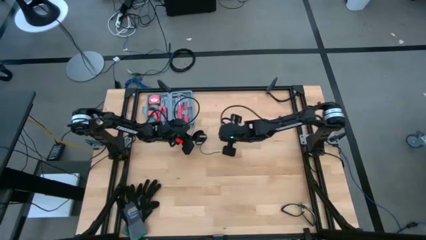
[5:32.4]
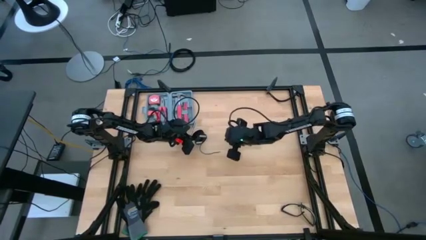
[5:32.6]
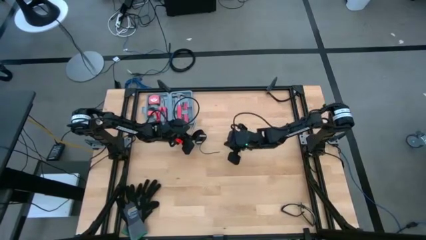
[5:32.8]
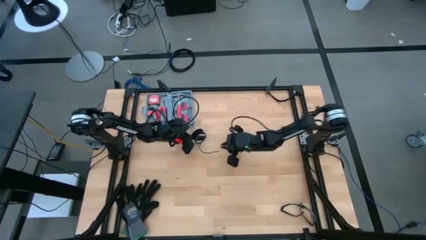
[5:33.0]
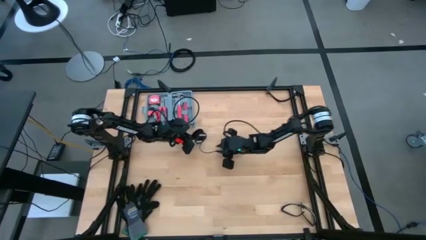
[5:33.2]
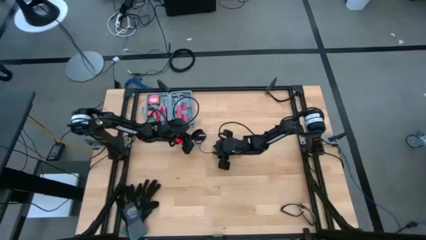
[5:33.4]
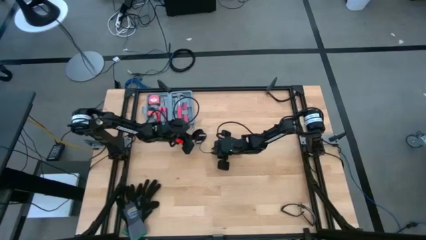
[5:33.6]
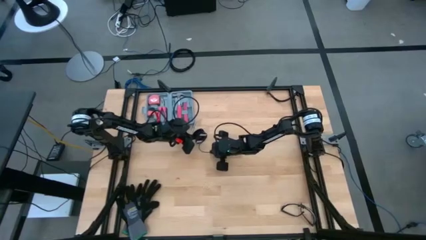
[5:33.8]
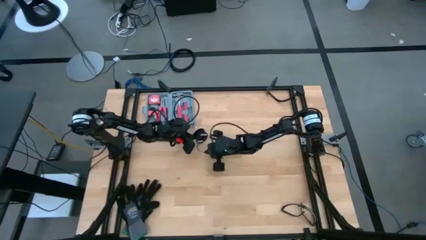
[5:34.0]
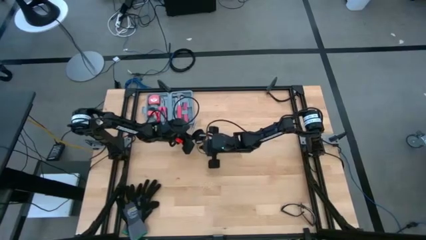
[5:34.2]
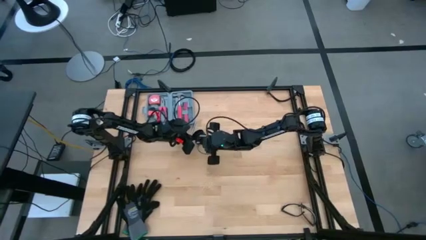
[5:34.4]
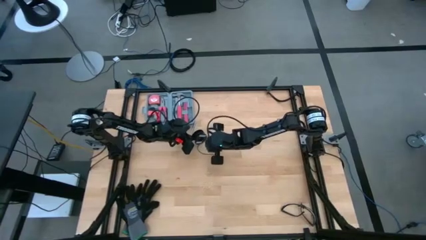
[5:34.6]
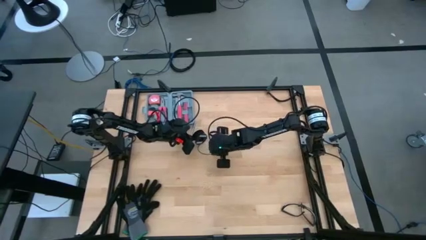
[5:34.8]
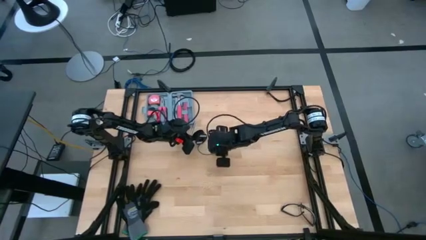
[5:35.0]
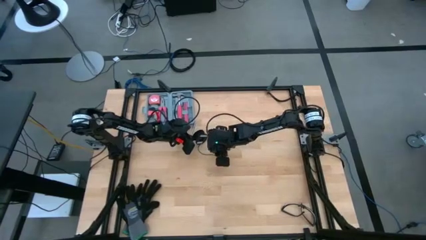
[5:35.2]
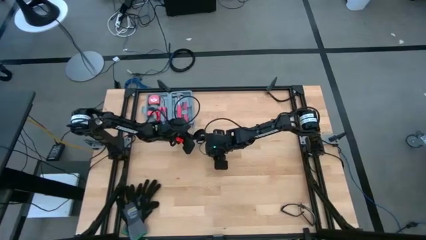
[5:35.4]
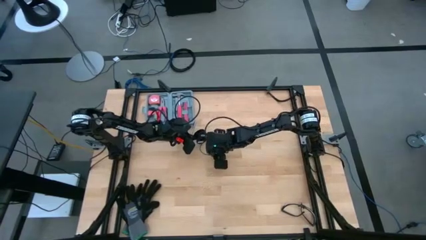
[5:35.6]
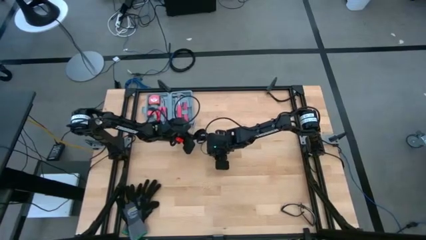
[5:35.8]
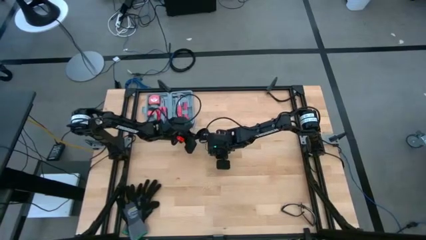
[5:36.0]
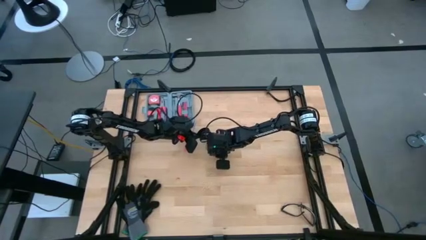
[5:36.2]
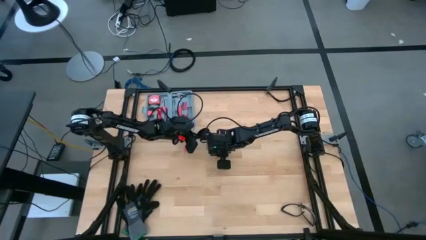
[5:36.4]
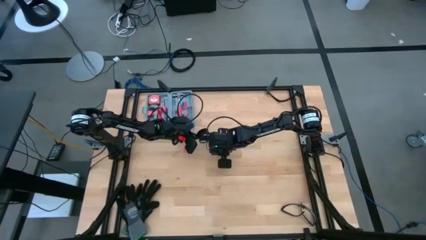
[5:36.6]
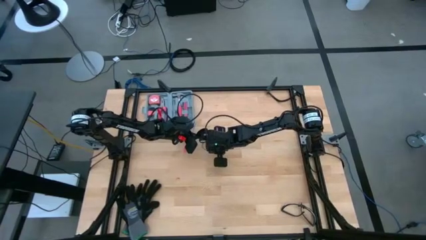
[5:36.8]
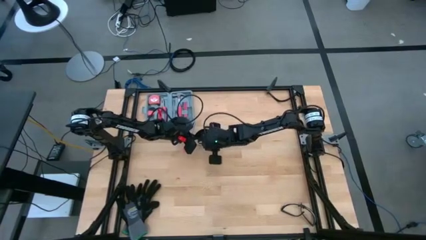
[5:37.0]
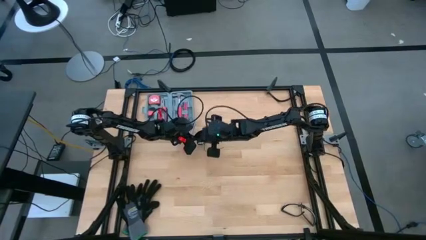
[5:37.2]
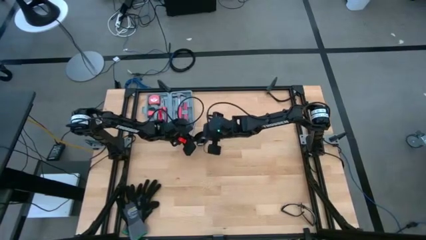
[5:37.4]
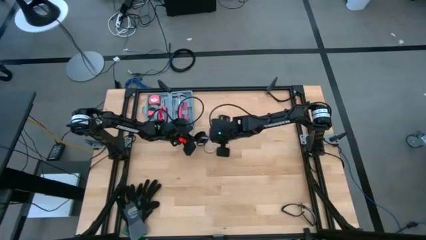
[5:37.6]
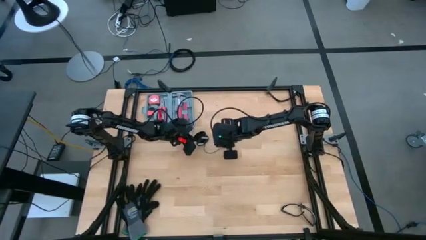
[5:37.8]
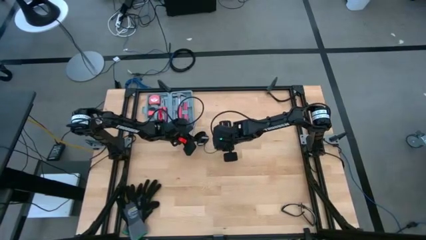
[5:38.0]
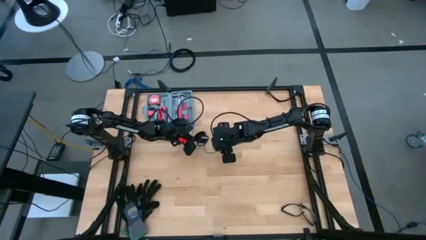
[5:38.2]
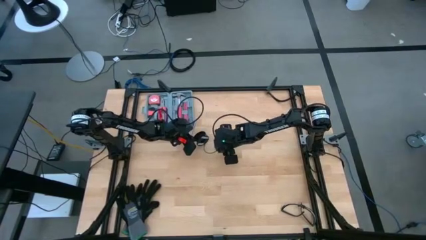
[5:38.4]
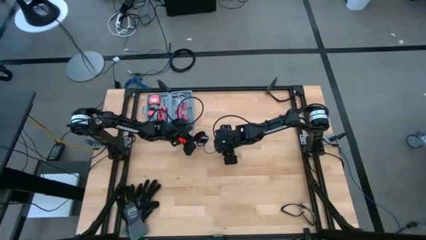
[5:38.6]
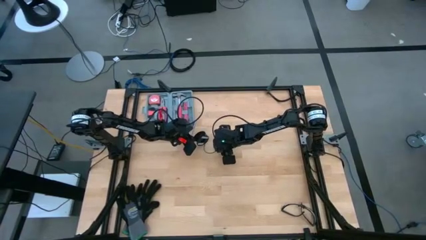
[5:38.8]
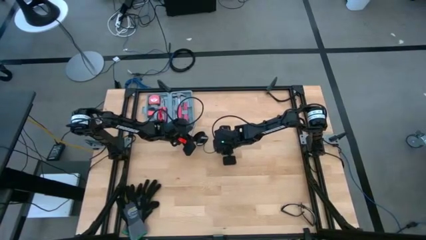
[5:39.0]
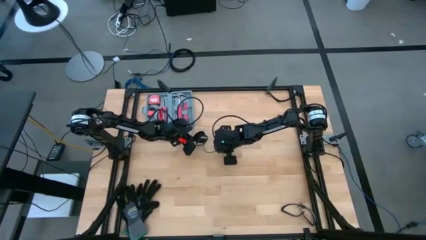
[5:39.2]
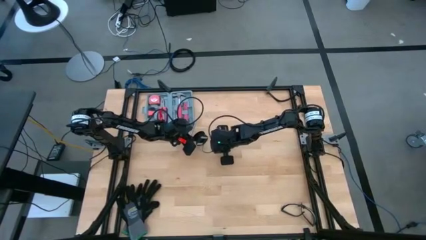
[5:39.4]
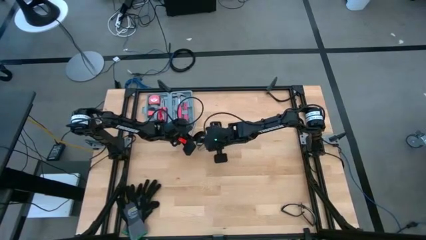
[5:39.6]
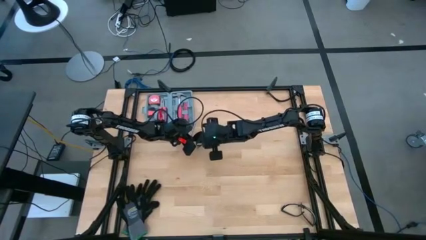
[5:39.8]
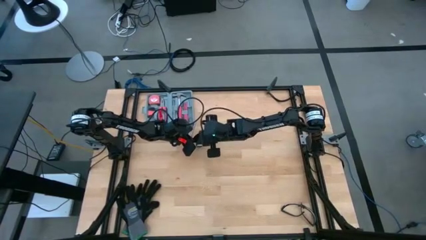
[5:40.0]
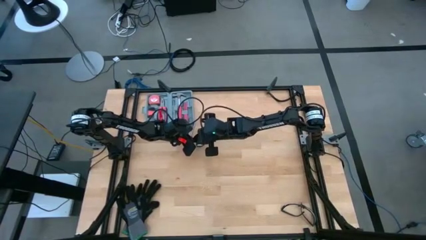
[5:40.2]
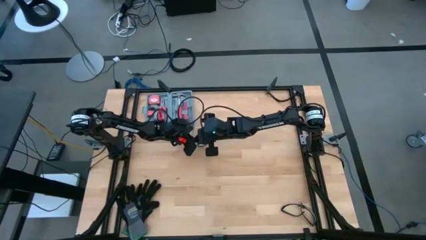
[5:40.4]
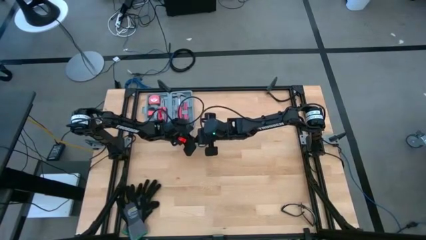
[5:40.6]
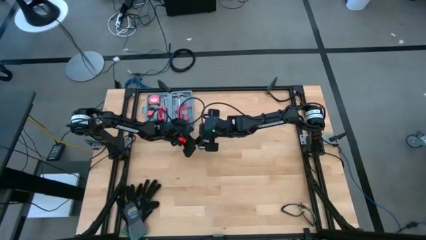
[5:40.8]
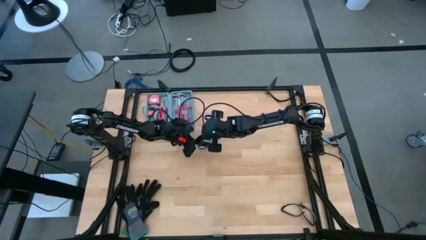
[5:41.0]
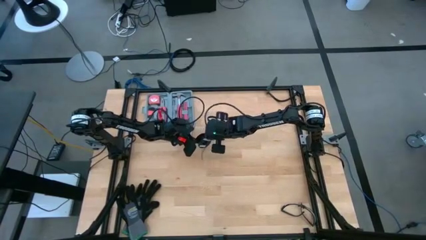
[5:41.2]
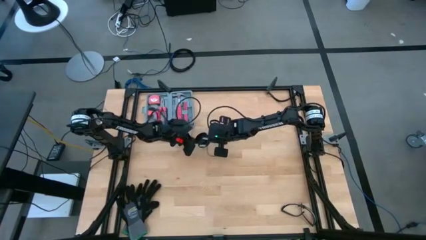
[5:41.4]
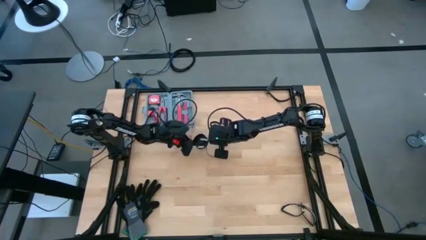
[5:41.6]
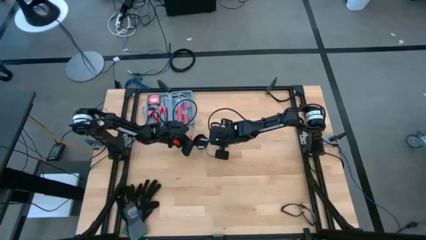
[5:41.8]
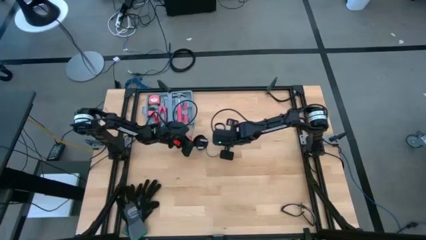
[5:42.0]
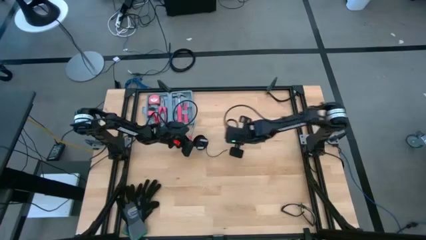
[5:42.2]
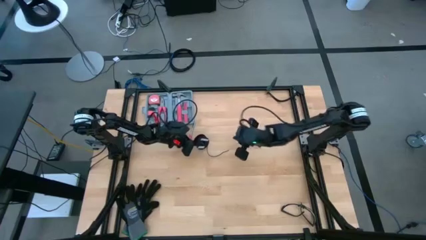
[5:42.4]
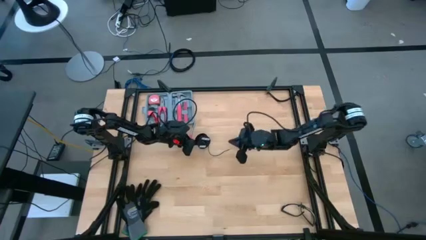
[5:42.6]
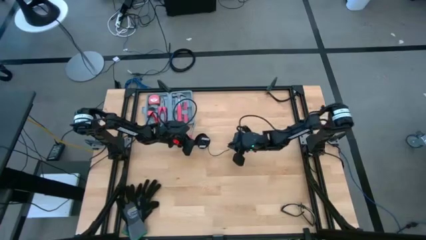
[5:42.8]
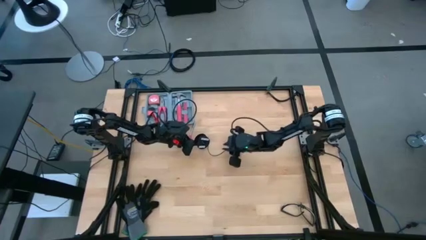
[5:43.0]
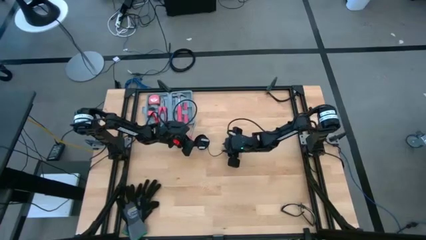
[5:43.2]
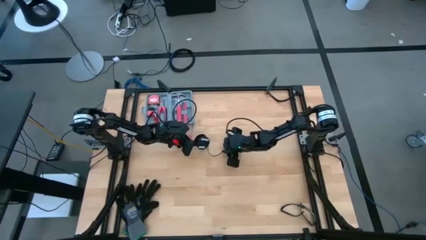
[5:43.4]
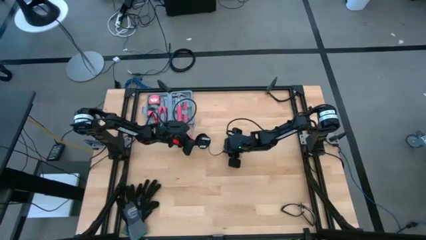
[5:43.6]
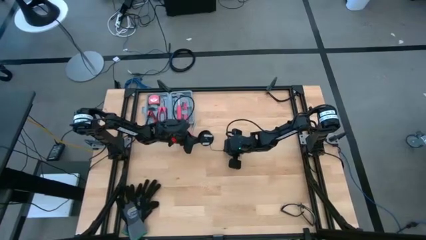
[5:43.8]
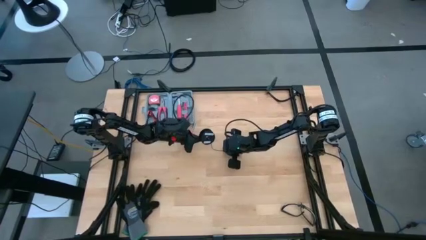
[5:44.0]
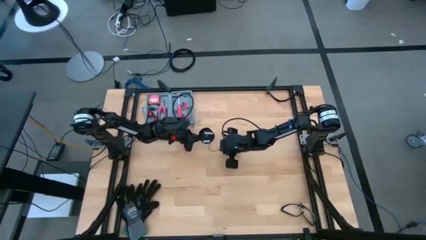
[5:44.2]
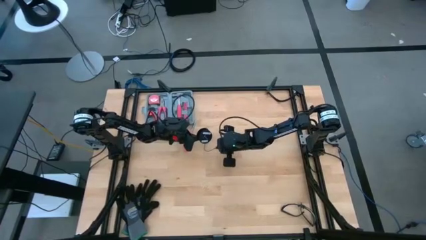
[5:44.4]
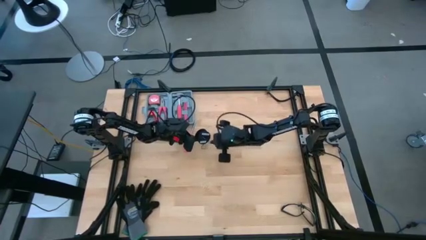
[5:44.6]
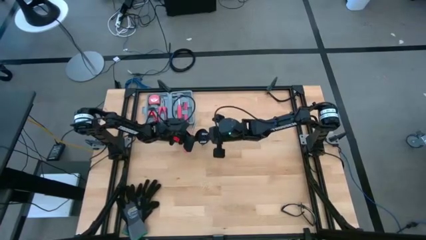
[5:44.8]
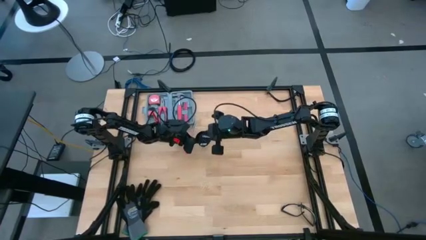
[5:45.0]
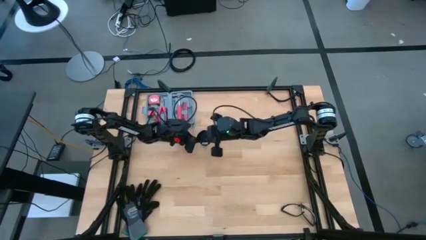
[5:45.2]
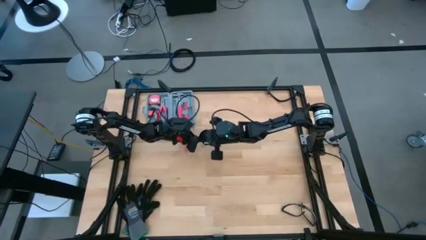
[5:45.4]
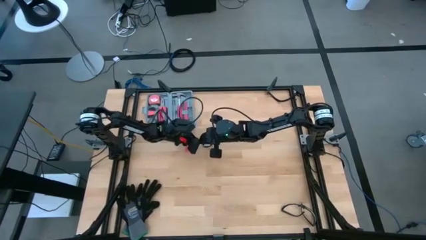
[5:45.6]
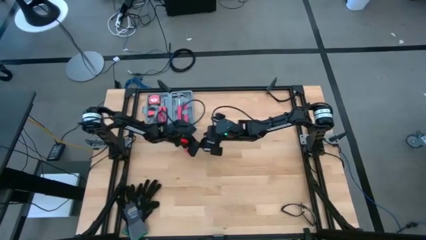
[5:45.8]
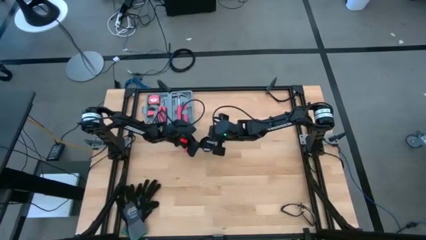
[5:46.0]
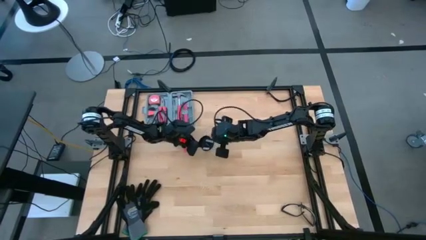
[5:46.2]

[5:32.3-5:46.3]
Task: Coil cords
Coil the black wire onto the spool

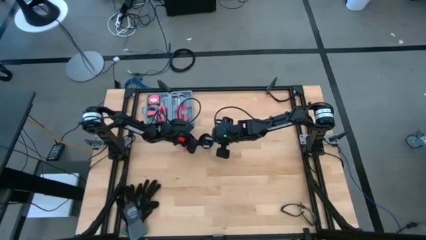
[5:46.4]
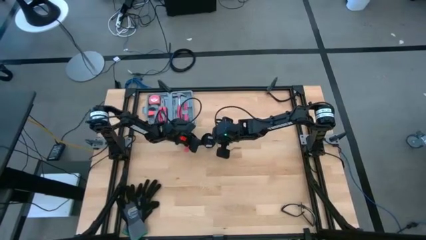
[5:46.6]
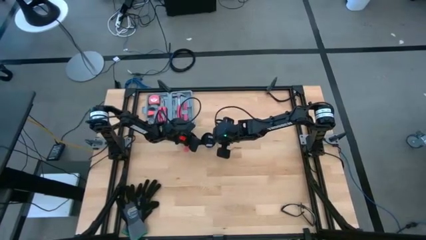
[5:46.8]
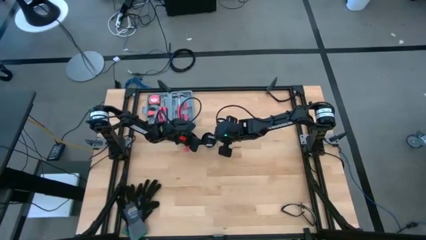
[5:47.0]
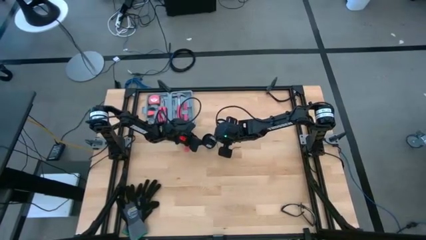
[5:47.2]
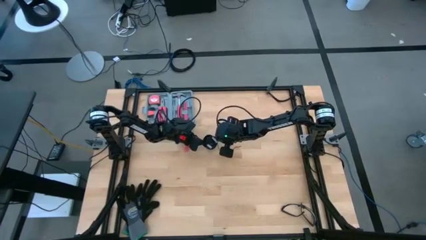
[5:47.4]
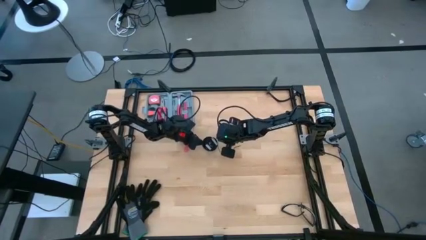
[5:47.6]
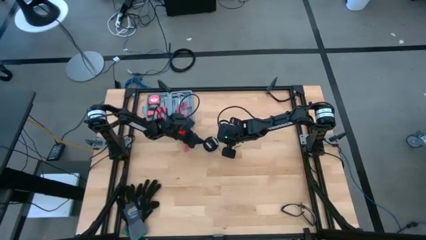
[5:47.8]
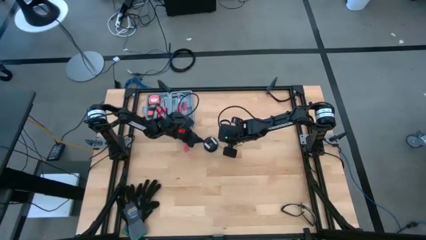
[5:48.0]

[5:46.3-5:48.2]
Coil the black wire onto the spool
